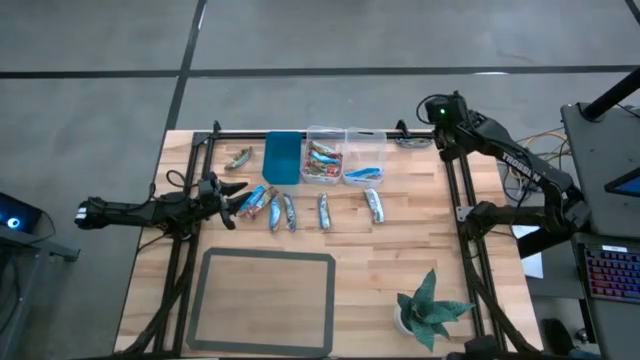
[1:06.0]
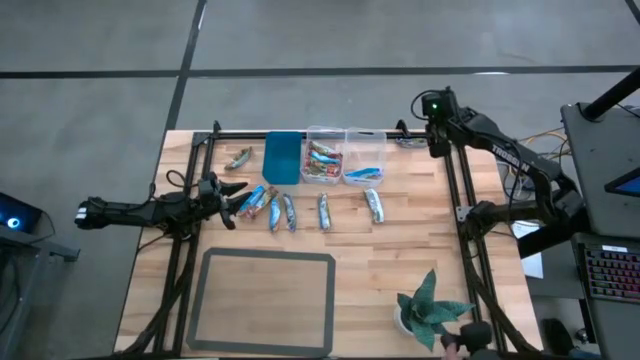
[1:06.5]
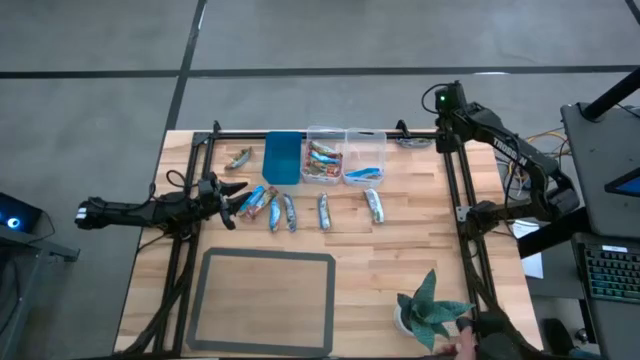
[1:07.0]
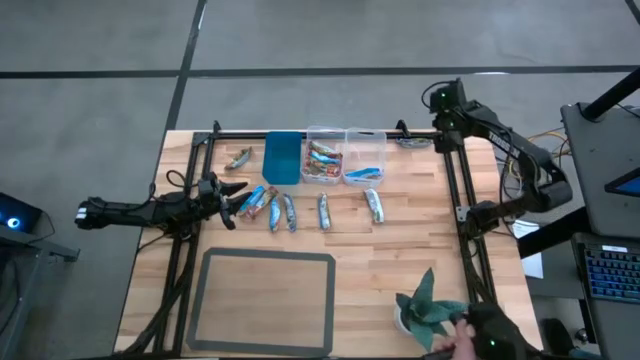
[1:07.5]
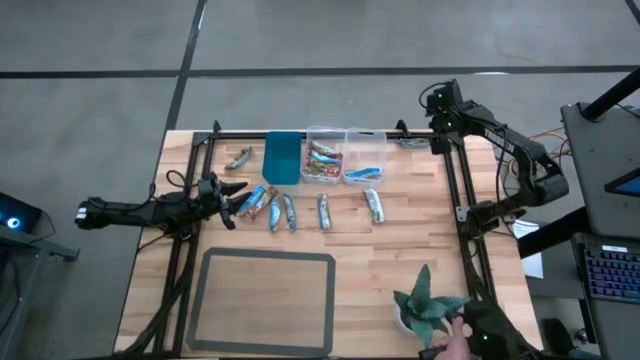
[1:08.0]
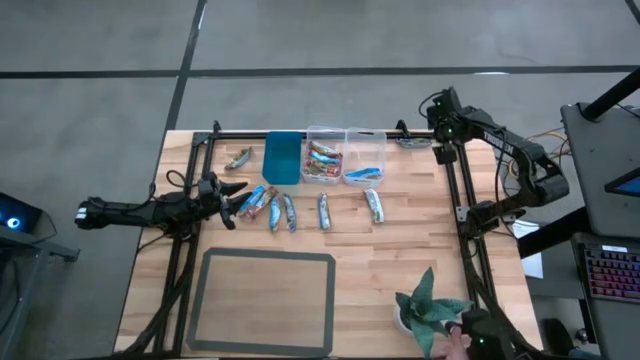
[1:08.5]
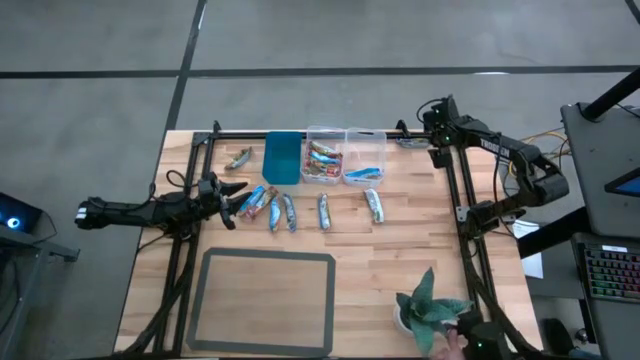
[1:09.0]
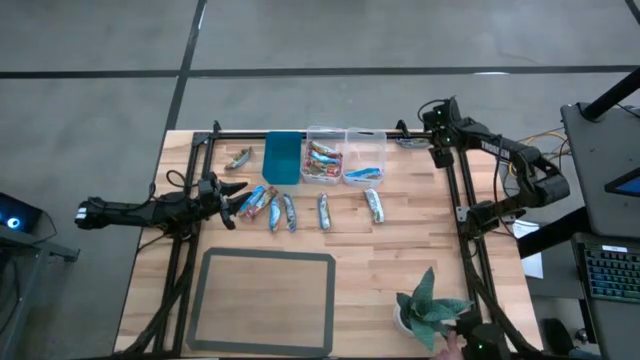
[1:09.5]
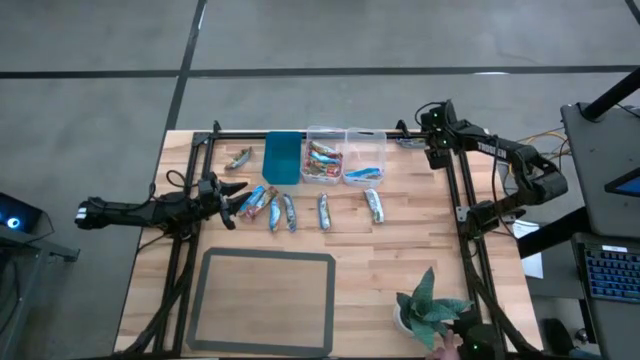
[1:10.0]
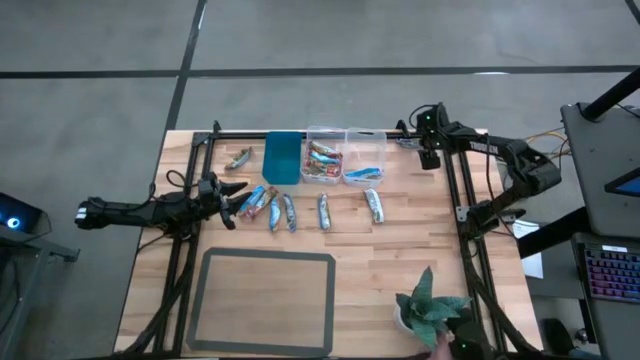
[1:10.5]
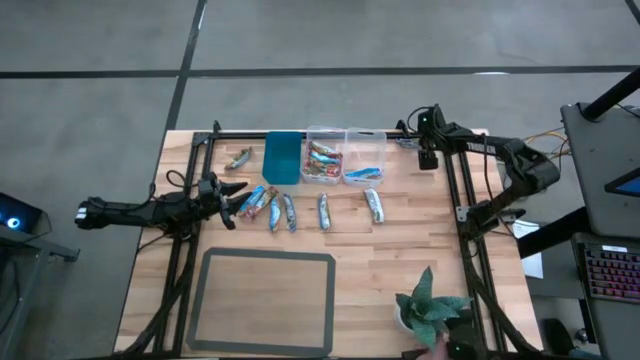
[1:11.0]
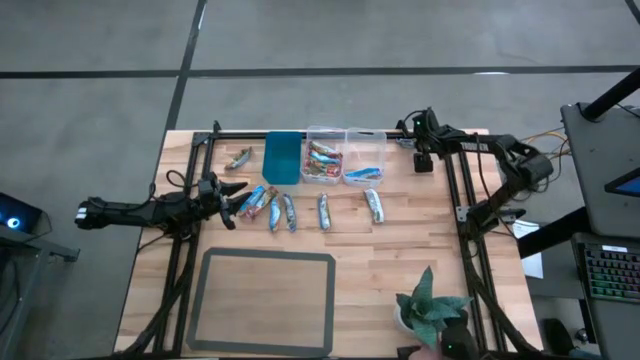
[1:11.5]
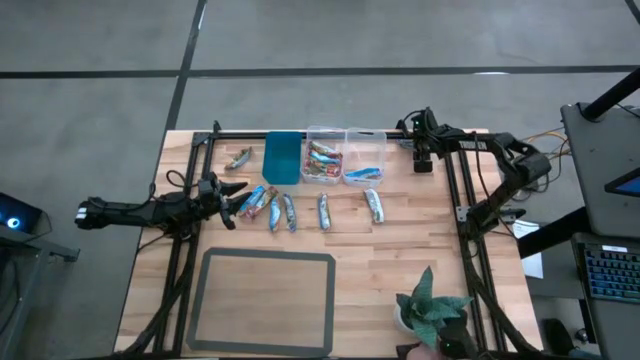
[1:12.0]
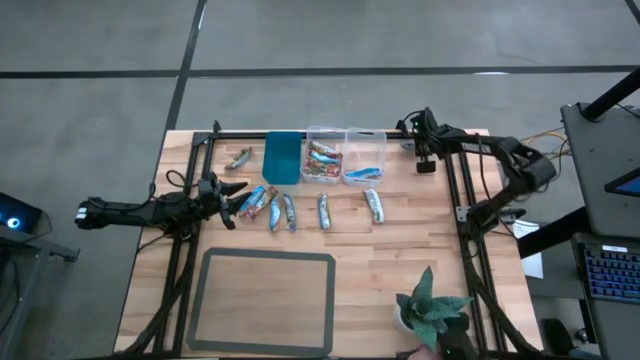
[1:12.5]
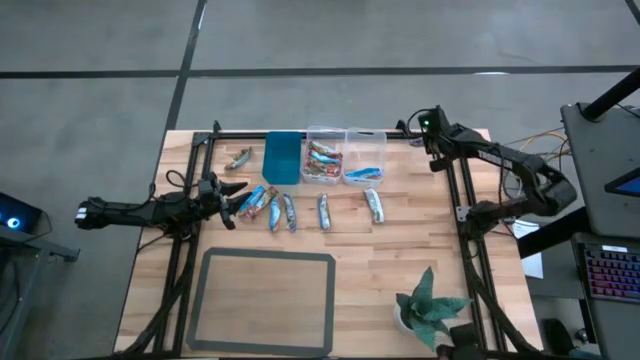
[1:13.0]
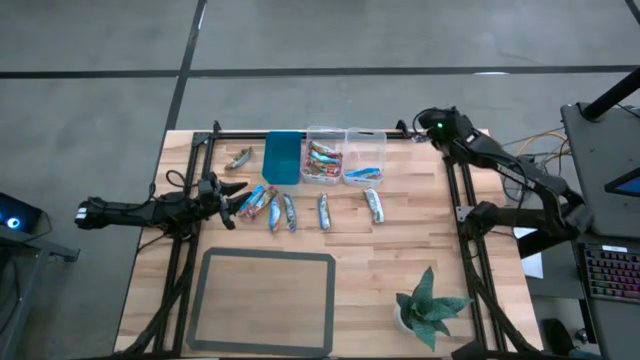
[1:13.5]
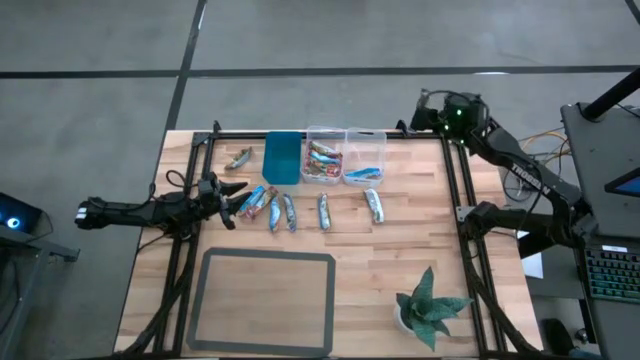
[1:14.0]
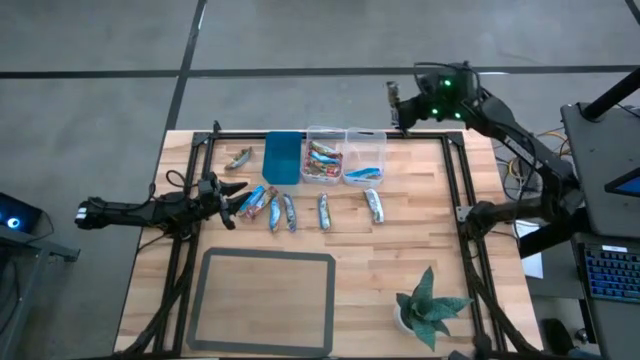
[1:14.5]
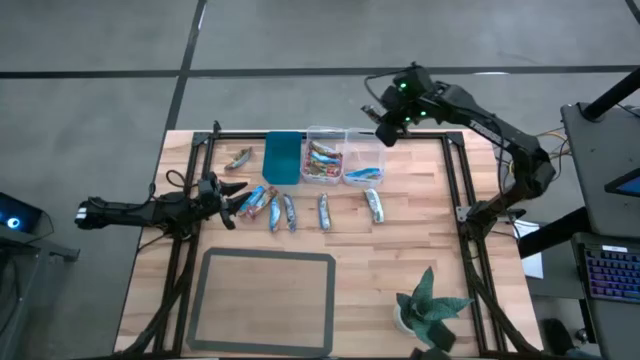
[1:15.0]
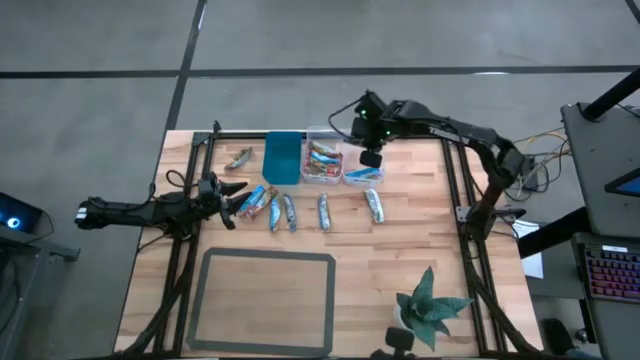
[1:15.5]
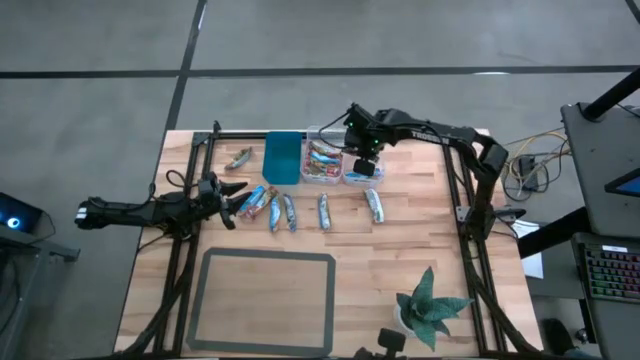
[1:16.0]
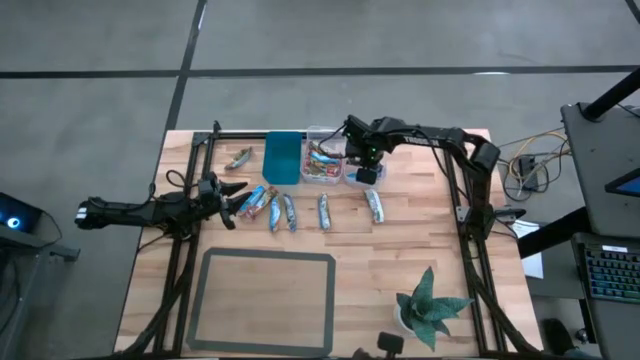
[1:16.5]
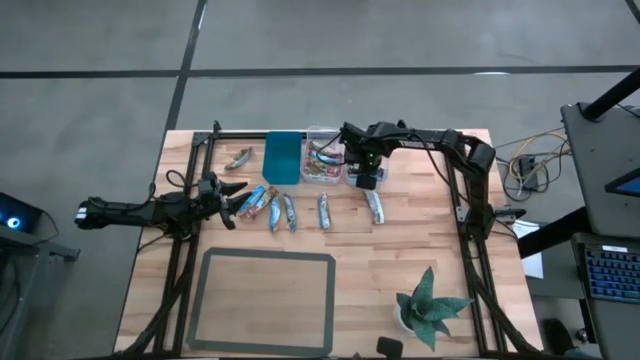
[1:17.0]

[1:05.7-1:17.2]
Task: Pick and place Granola Bars by type
Put the top blue granola bar into the right transparent bin

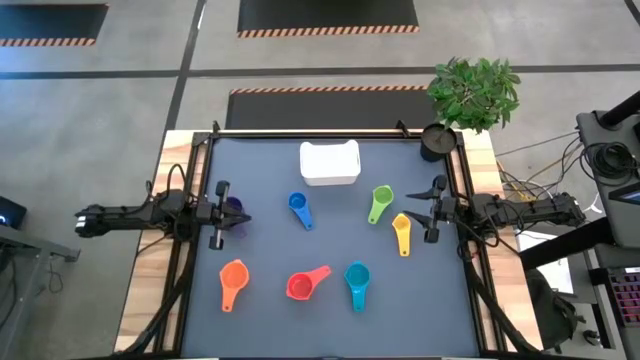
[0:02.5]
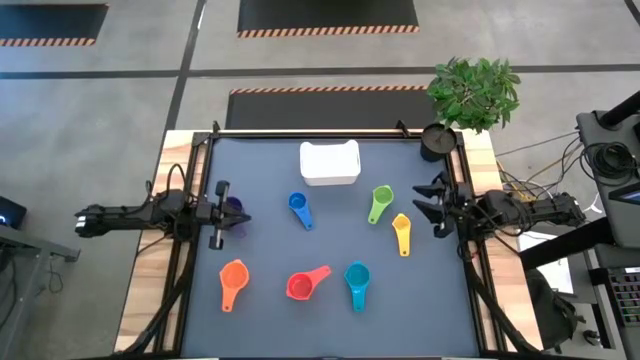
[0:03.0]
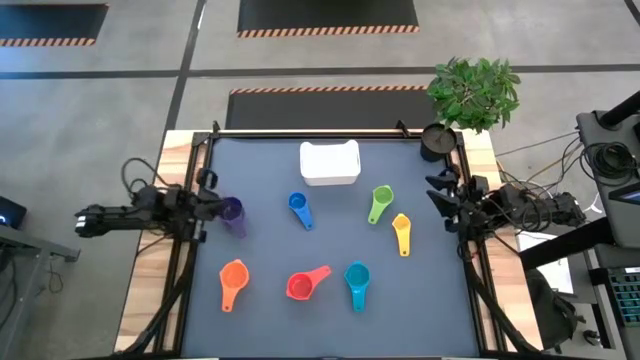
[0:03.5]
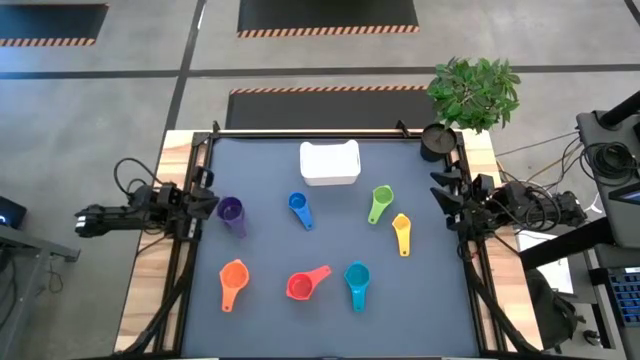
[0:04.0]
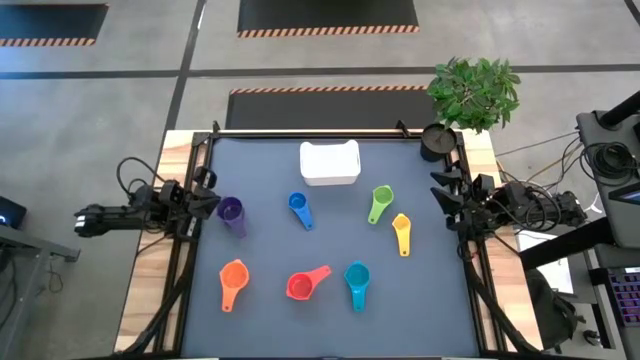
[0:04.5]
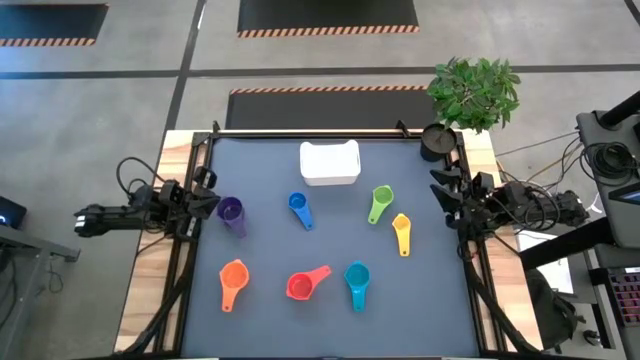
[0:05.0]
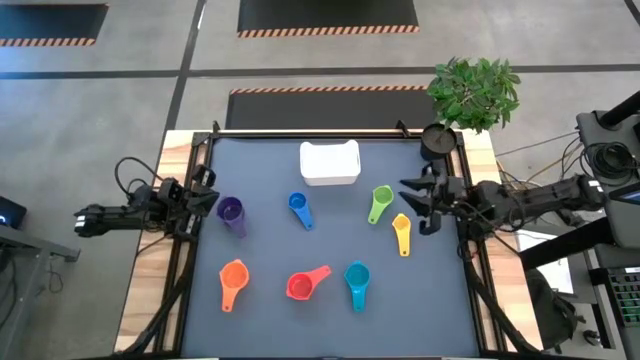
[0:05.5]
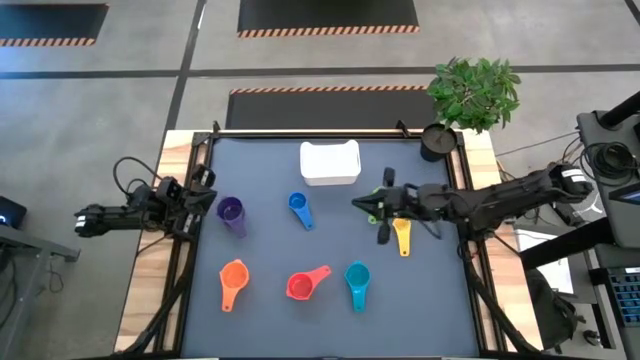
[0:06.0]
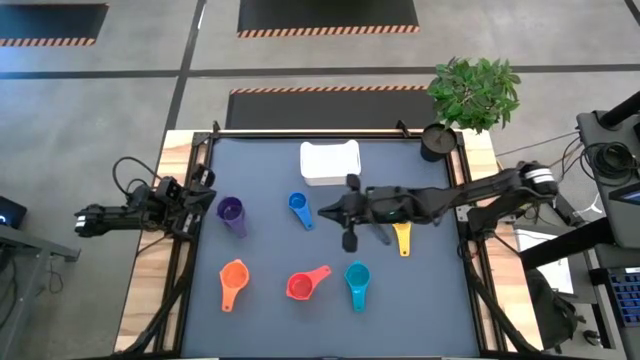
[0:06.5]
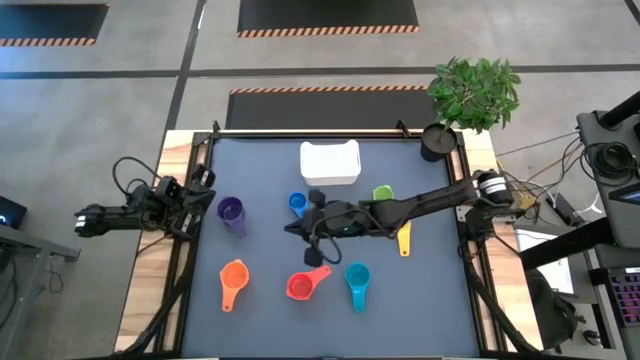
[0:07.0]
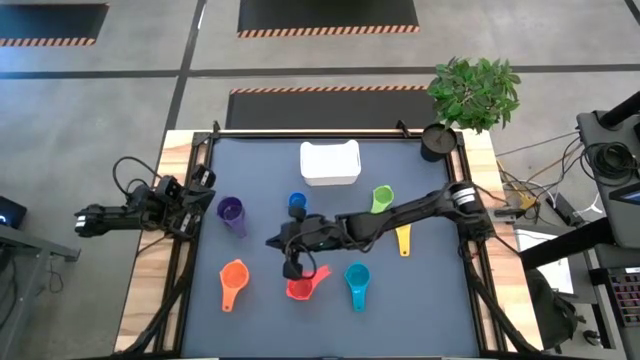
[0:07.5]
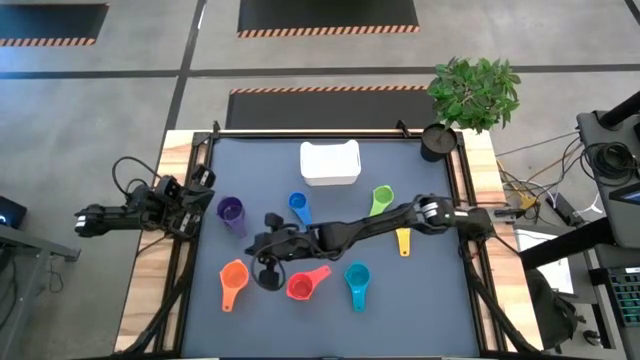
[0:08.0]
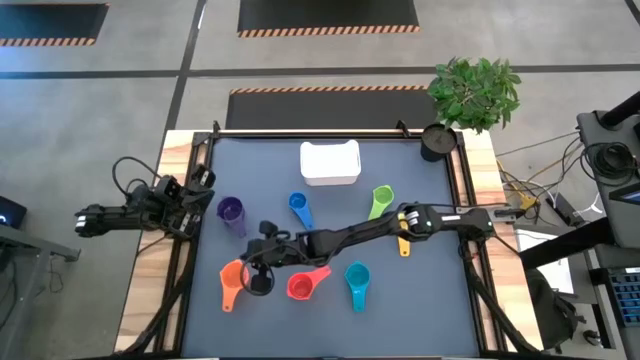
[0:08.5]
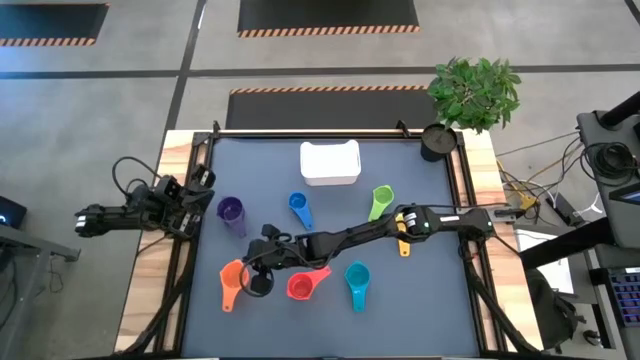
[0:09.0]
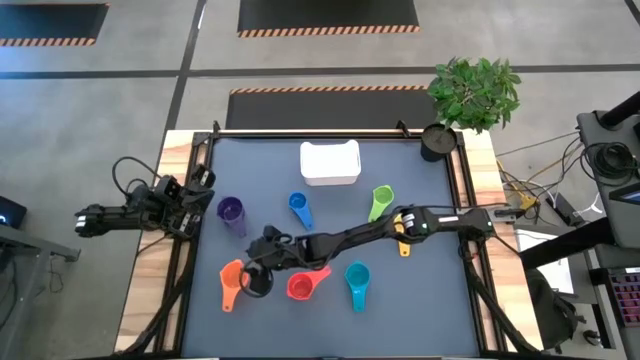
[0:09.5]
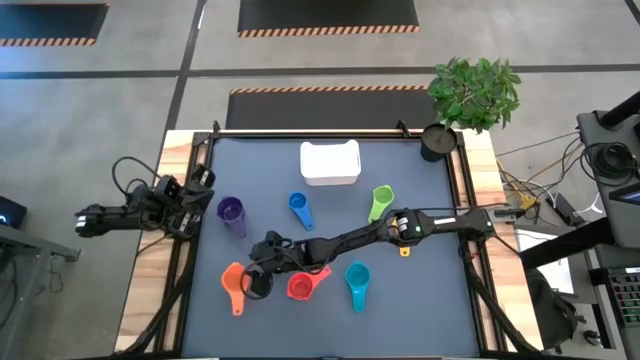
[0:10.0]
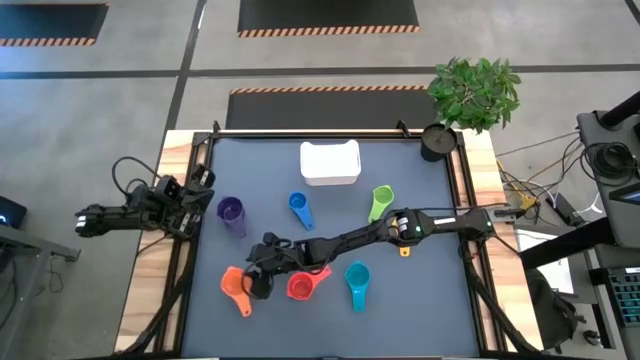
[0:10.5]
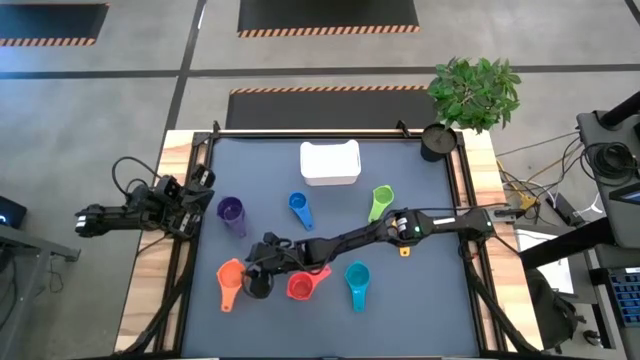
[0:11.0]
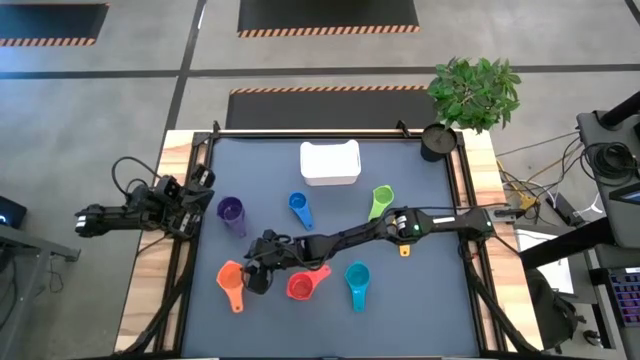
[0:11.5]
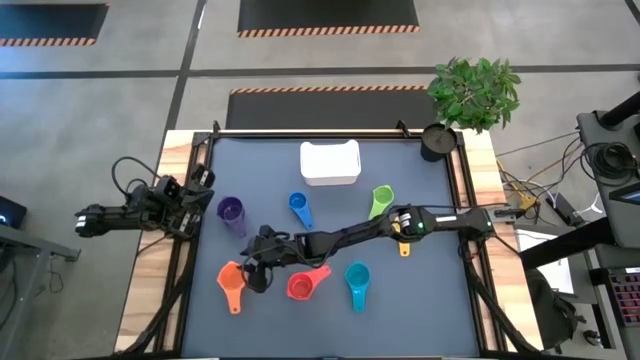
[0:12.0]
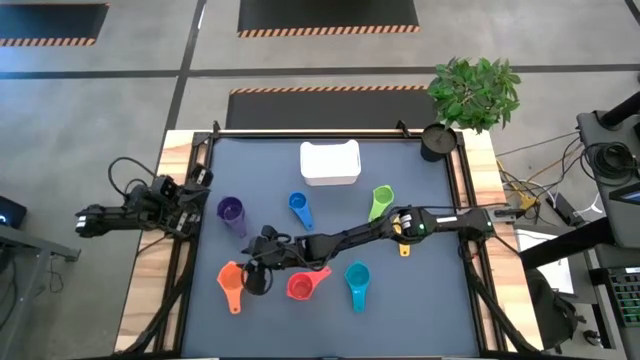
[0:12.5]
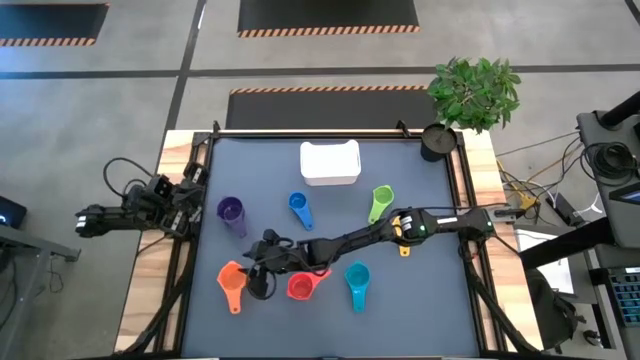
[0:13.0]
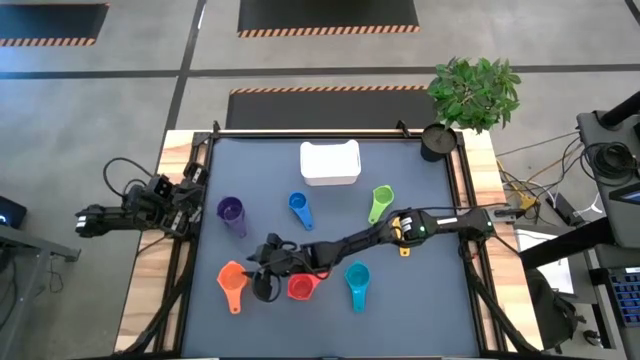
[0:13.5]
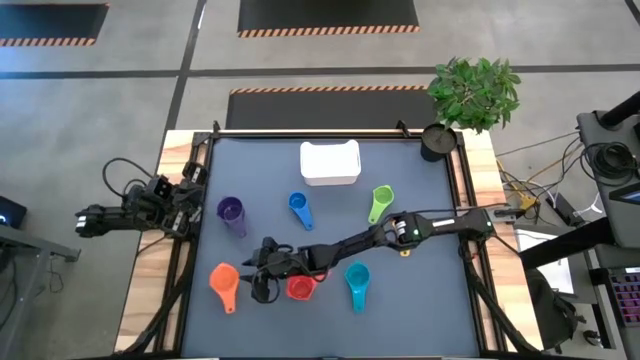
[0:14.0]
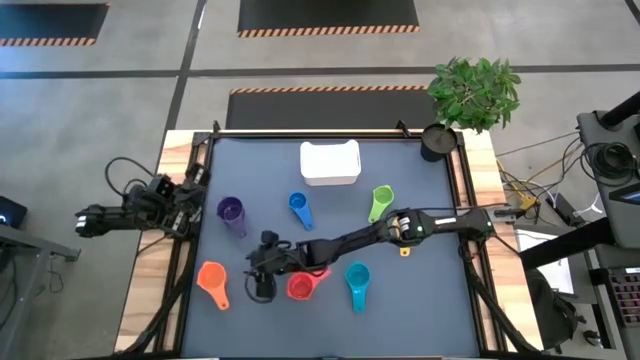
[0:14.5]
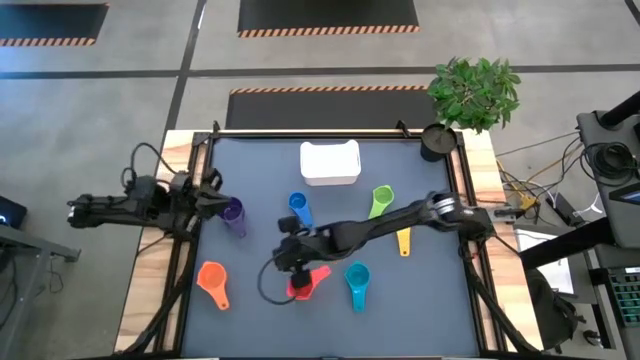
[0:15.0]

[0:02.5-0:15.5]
Task: Nest measuring cups in basket
Stack the orange measuring cup on top of the purple measuring cup
